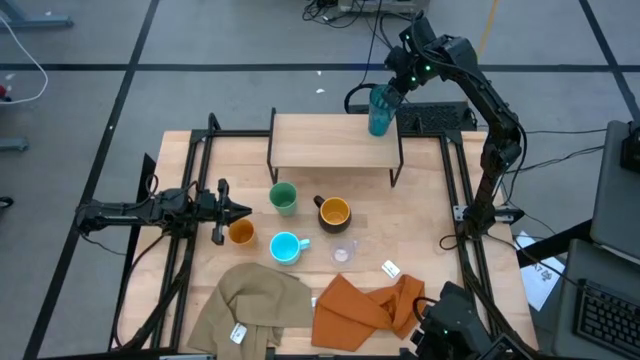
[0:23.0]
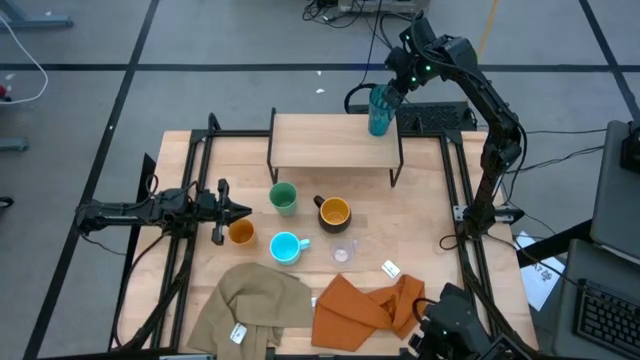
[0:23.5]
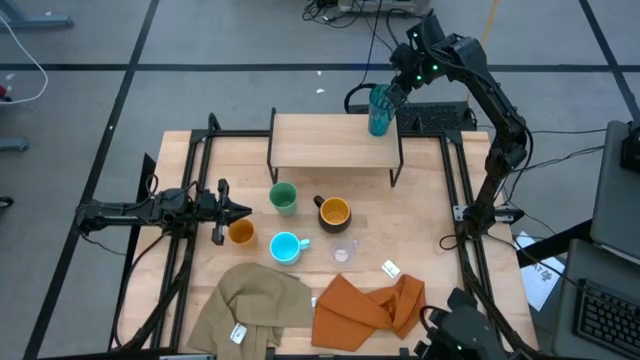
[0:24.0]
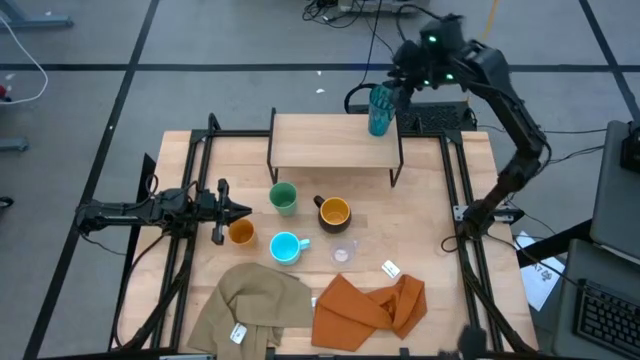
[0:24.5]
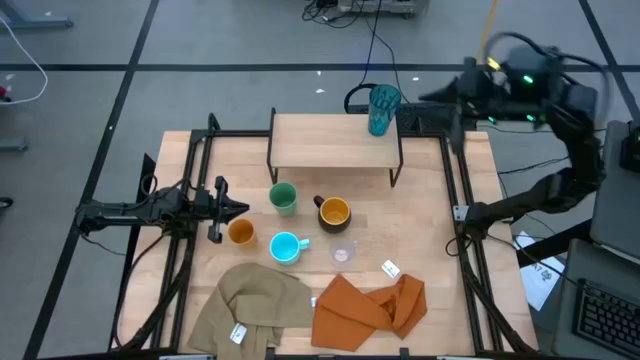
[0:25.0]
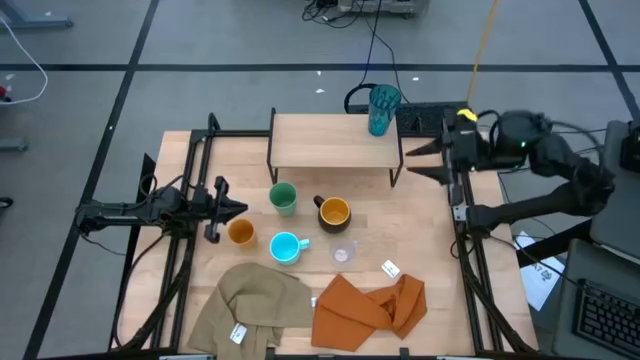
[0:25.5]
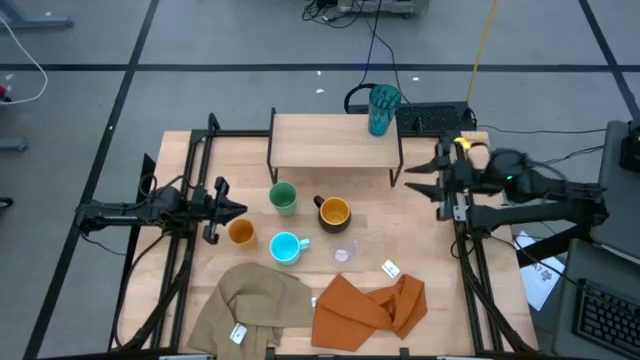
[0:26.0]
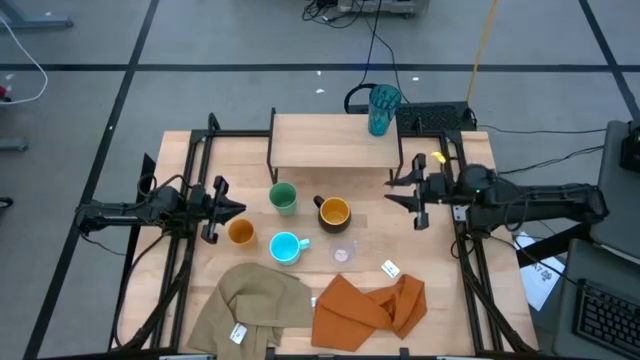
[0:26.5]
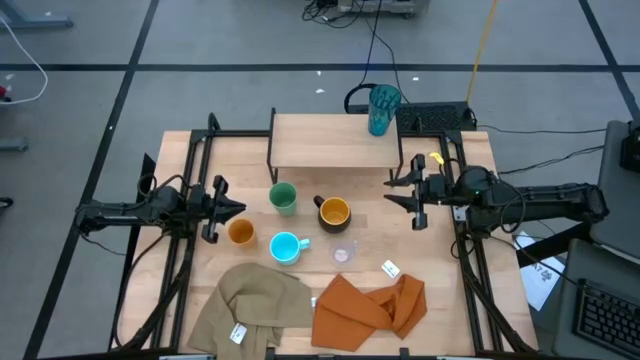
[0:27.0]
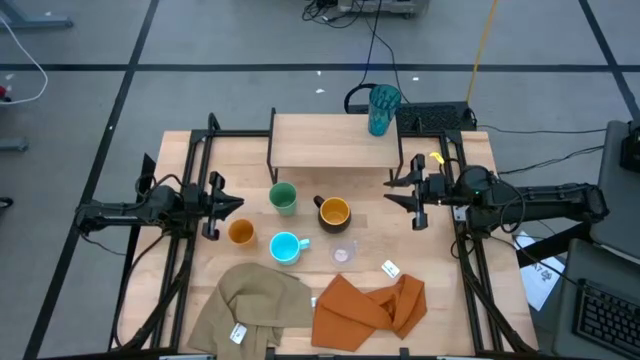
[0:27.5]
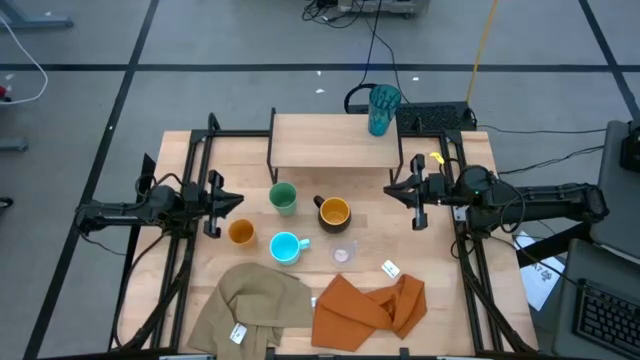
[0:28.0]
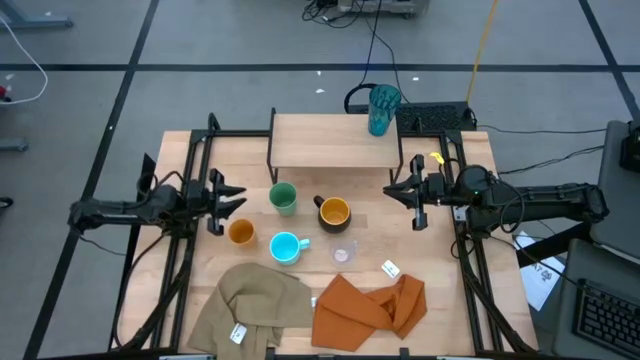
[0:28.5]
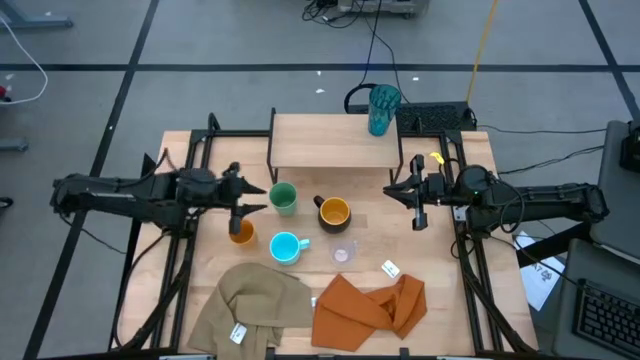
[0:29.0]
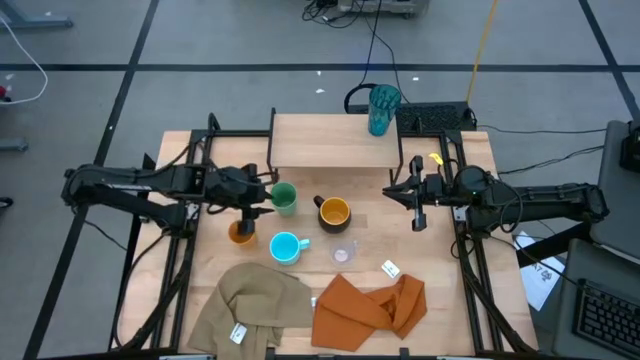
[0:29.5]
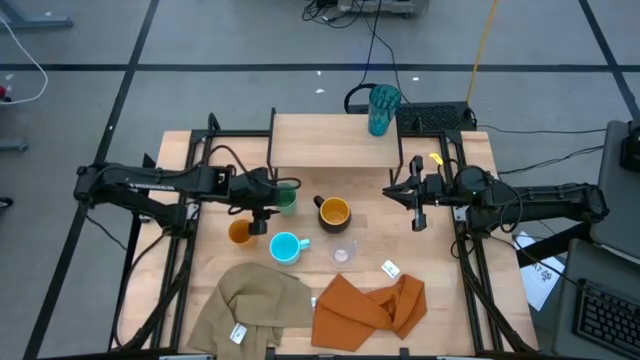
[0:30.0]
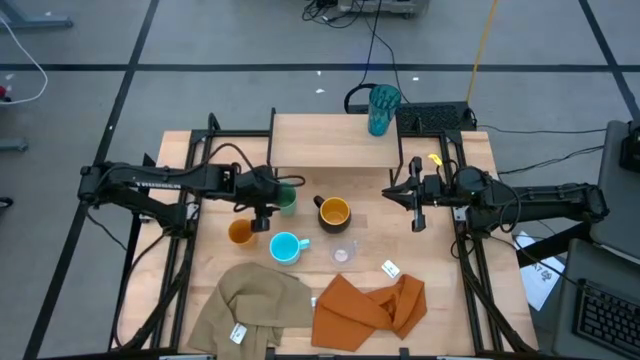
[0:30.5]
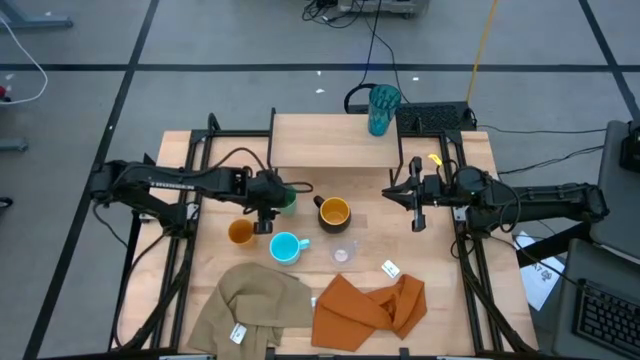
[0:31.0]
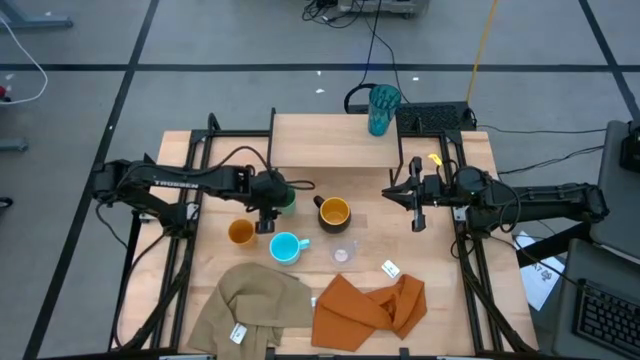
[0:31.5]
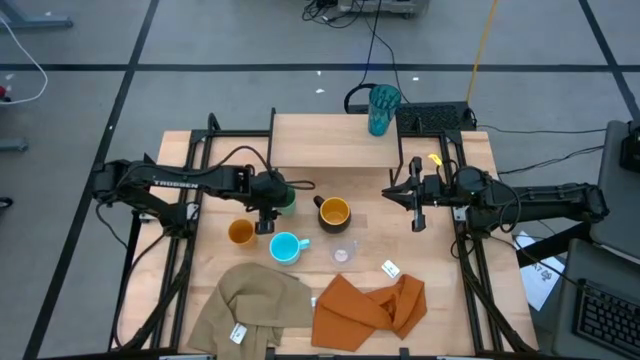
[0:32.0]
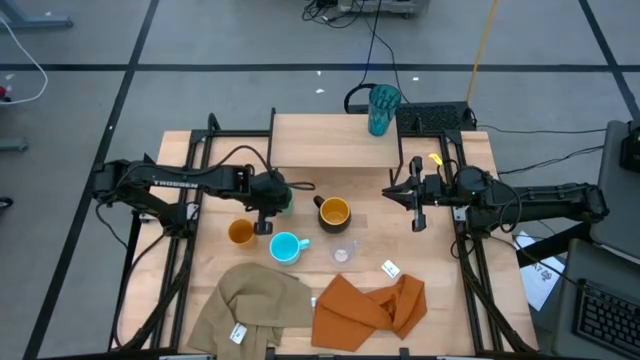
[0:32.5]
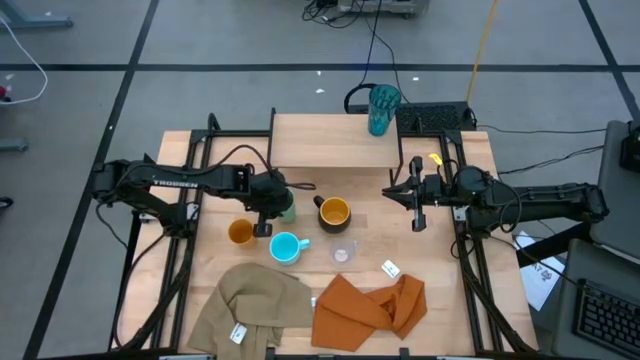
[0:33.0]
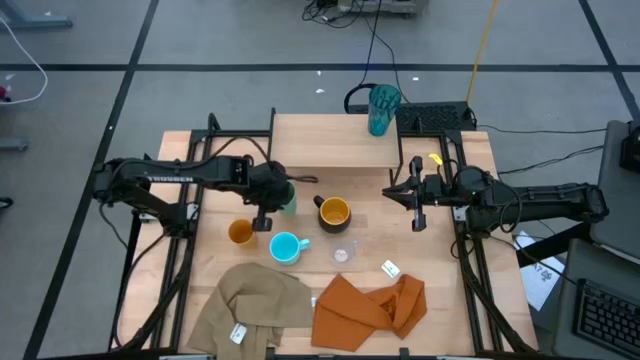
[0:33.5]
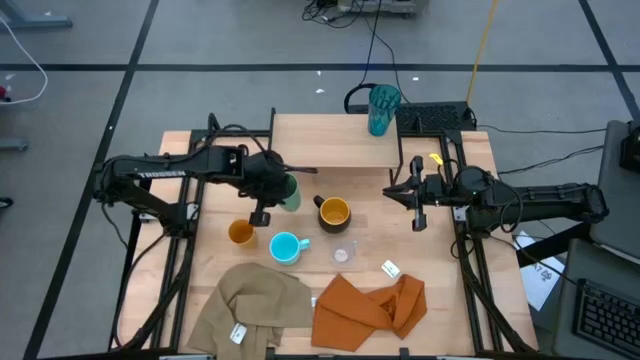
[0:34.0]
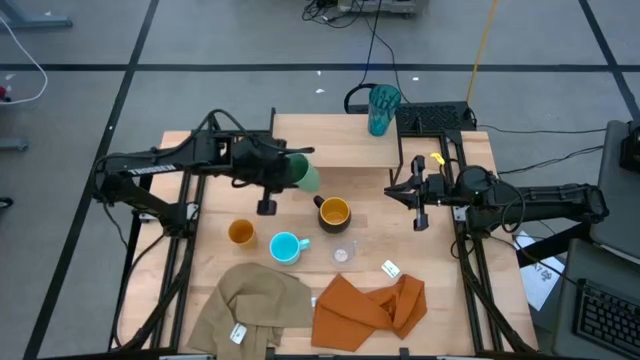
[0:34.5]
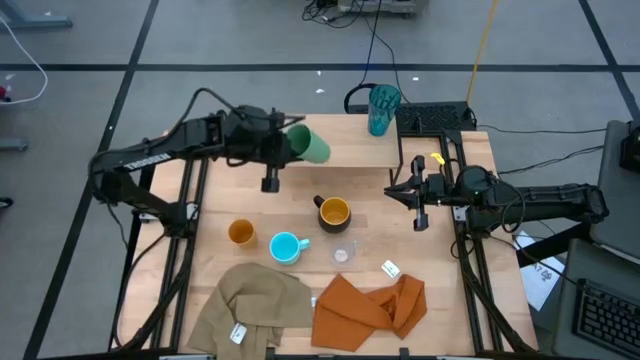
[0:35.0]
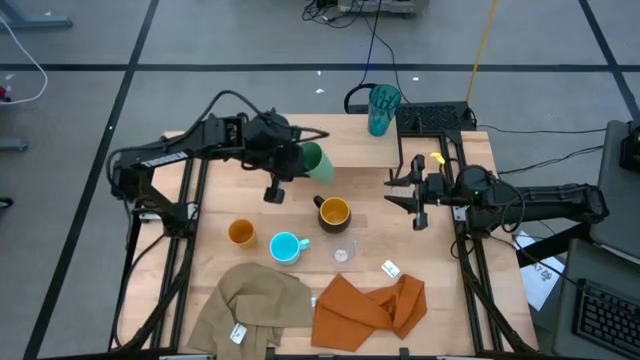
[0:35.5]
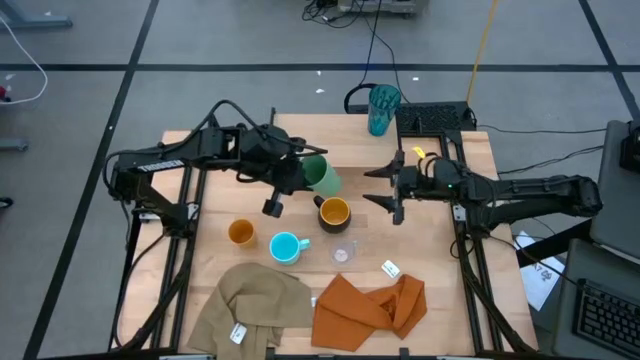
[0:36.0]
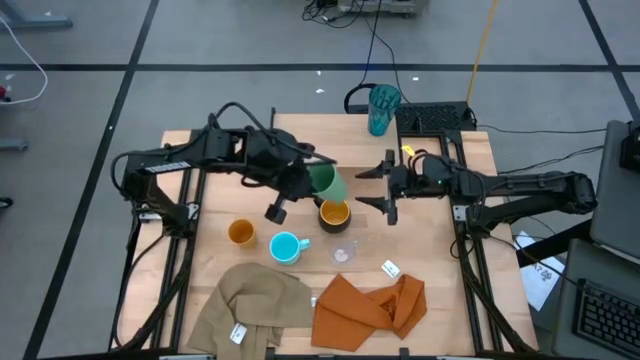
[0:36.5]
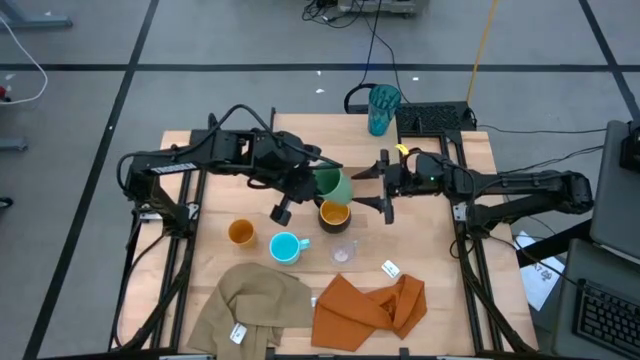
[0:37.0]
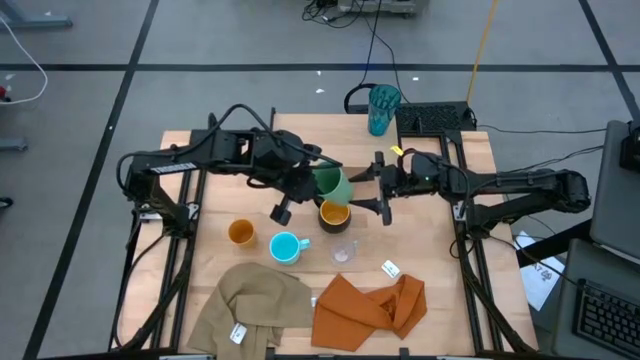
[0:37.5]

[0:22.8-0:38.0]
Task: Stack small to large cups/mugs on shelf
Put the green cup on the shelf

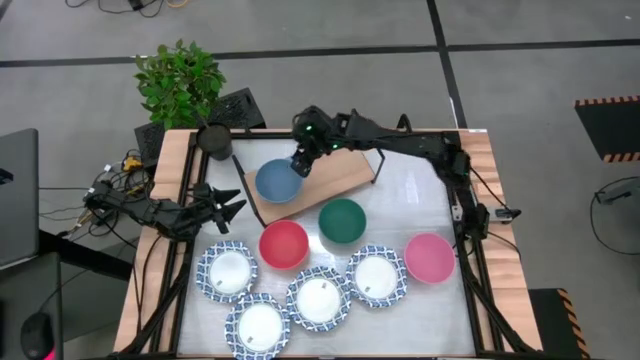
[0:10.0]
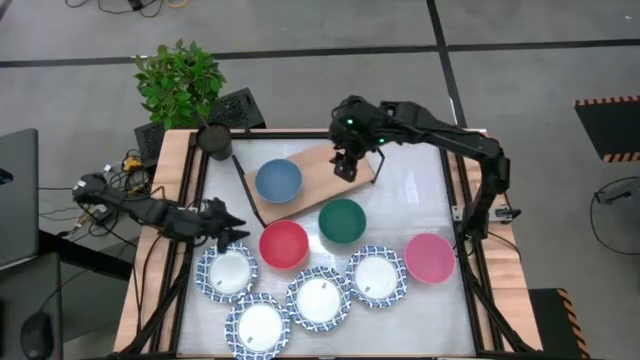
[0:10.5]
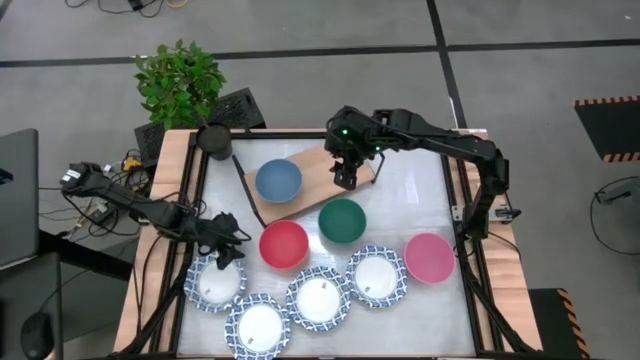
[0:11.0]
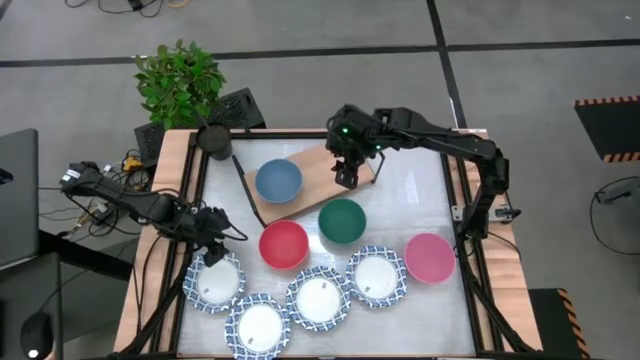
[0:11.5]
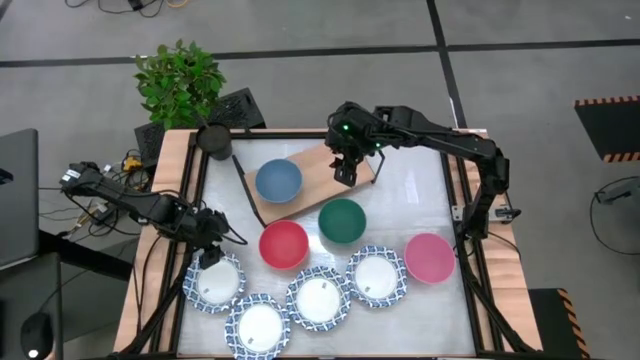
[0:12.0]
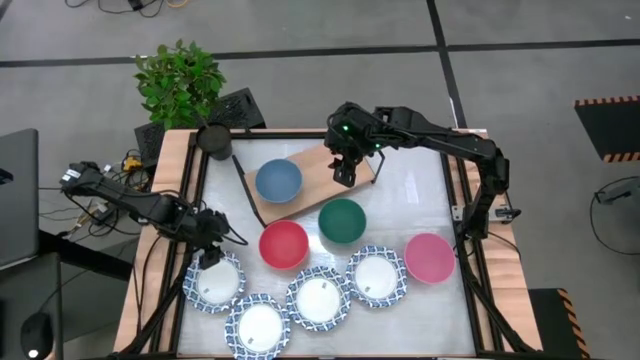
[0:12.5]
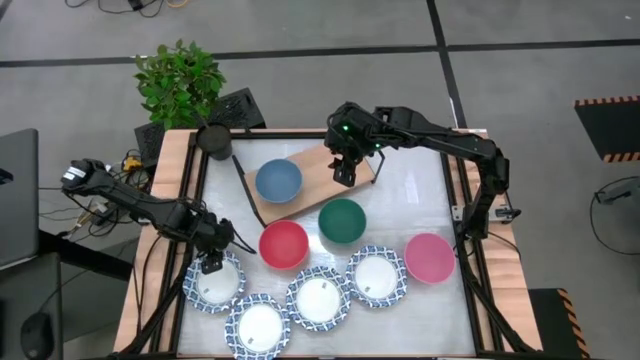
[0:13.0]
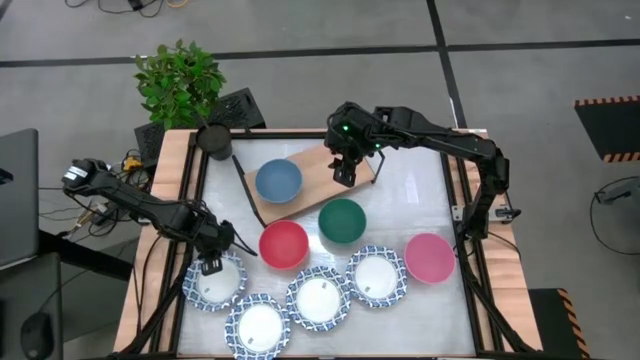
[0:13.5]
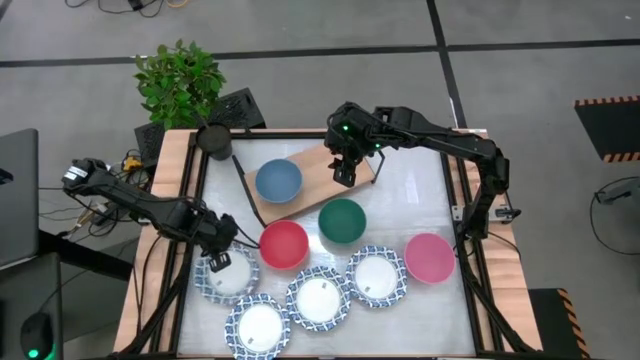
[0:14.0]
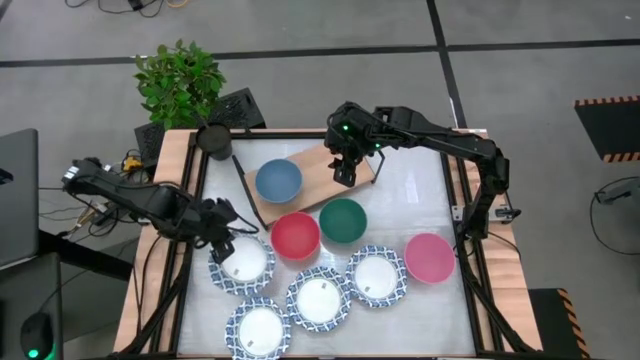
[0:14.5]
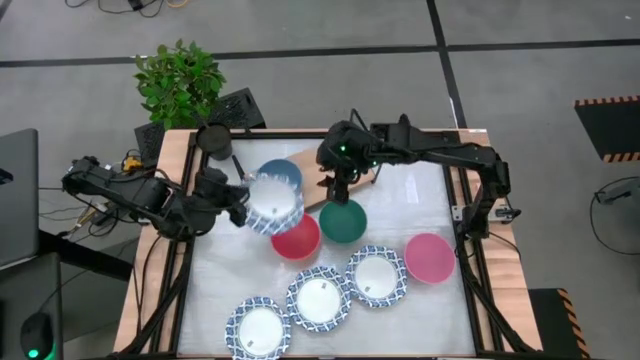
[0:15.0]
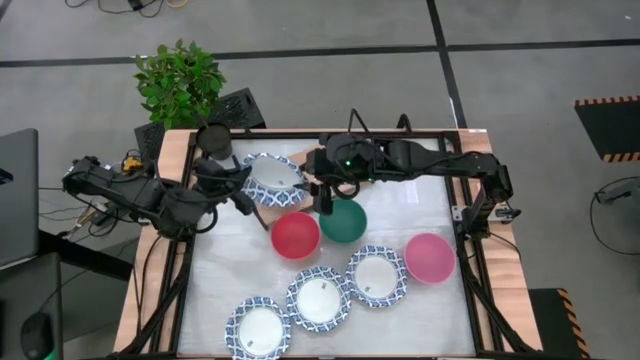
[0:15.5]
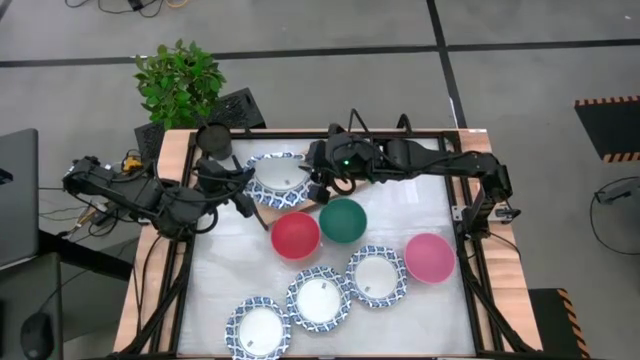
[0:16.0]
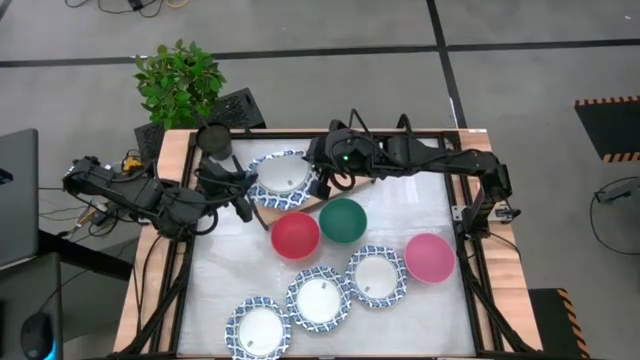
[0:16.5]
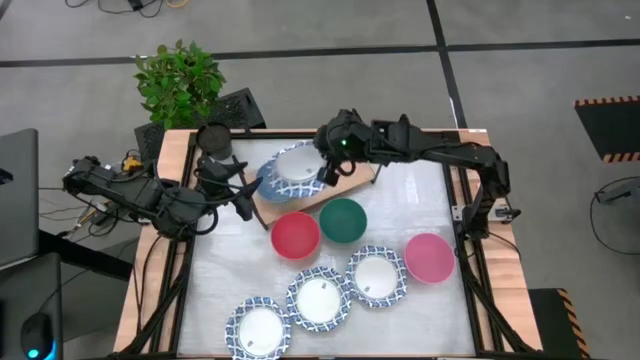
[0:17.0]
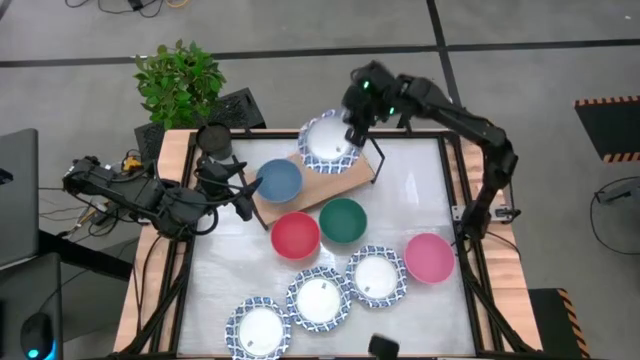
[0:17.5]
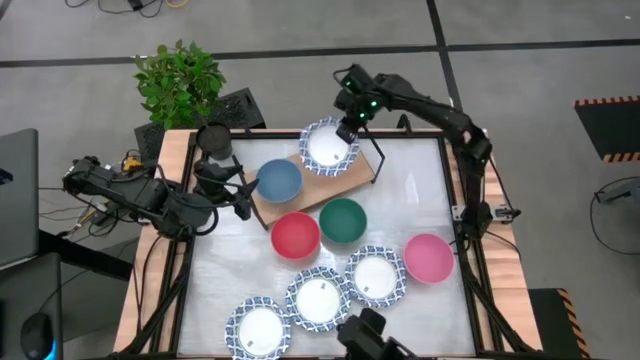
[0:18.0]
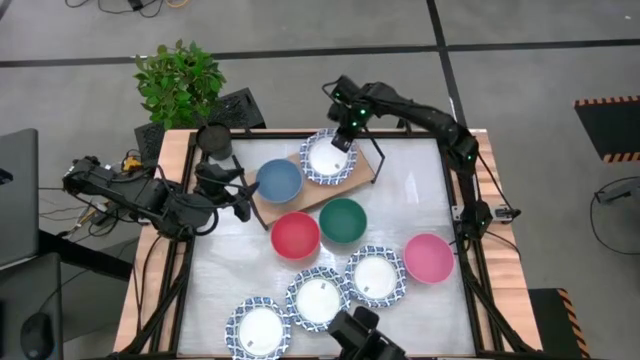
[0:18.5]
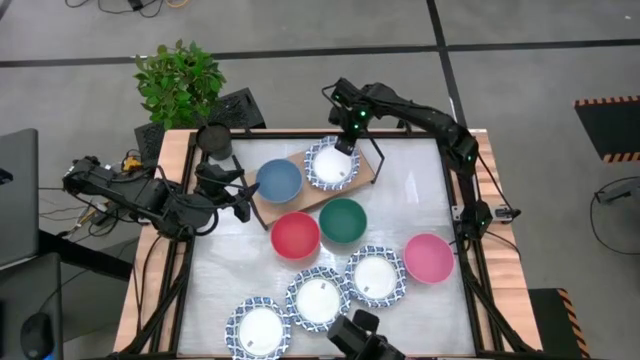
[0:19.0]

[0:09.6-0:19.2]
Task: Place and stack bowls onto a shelf
Put the white patterned bowl on the shelf
